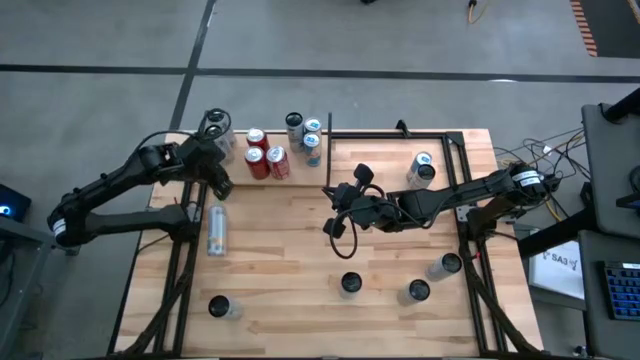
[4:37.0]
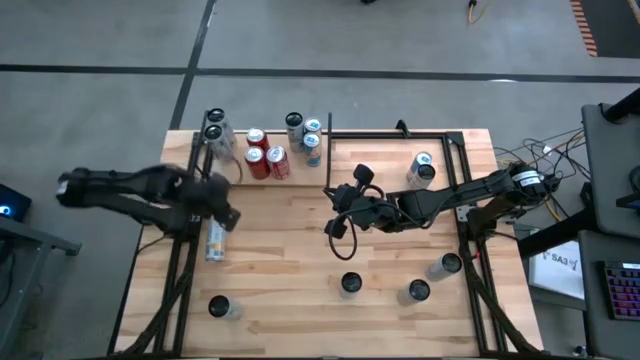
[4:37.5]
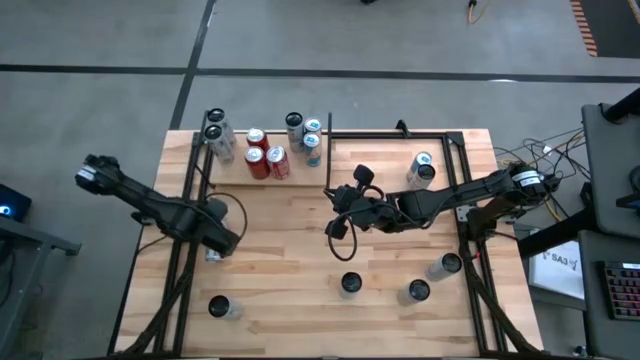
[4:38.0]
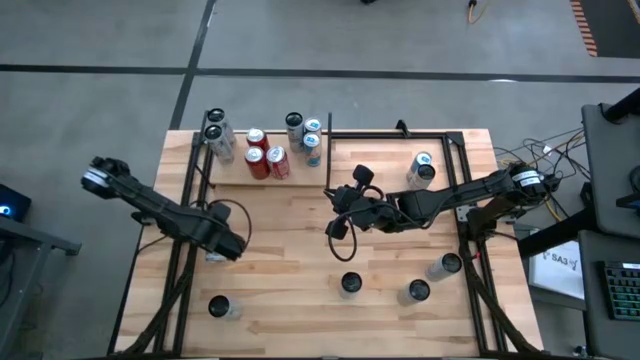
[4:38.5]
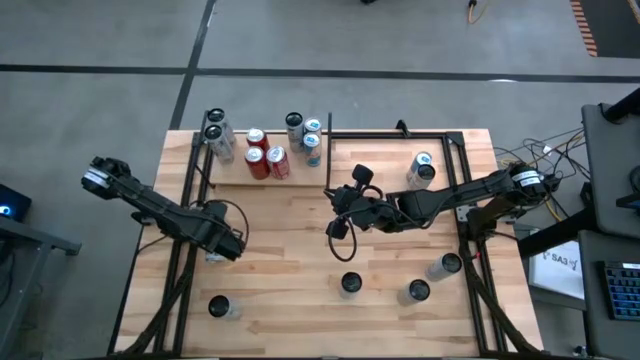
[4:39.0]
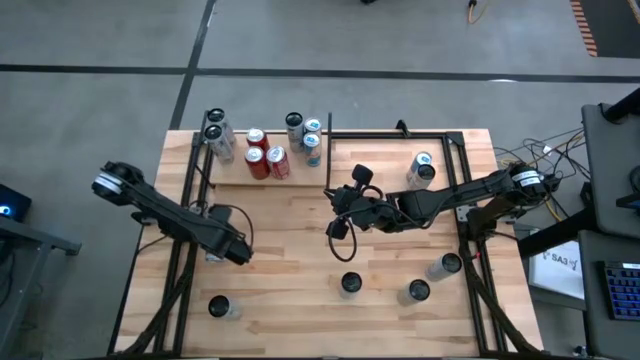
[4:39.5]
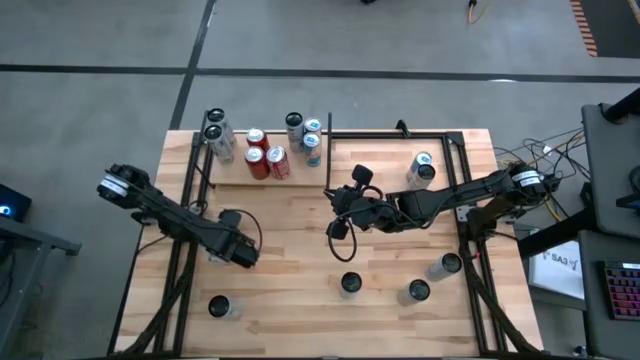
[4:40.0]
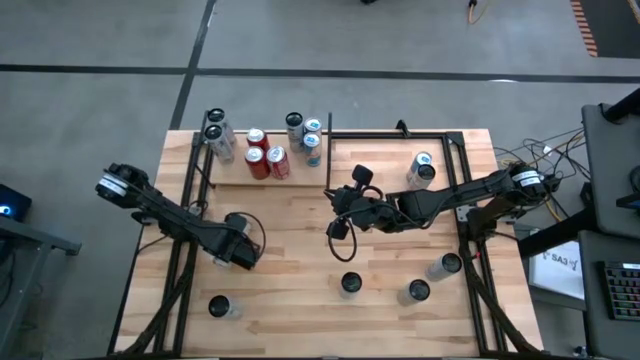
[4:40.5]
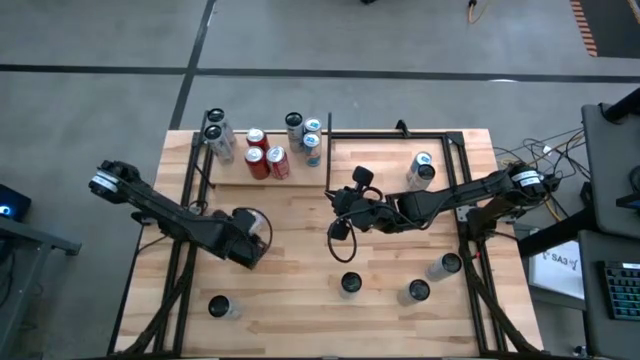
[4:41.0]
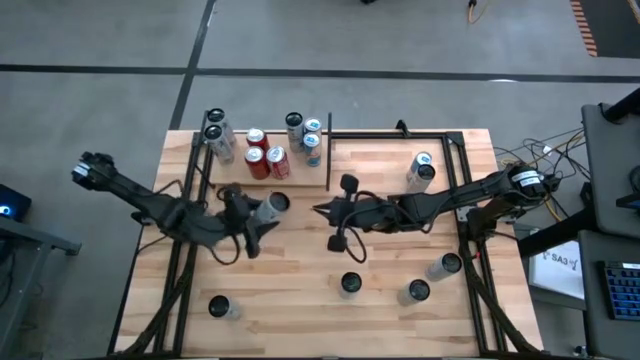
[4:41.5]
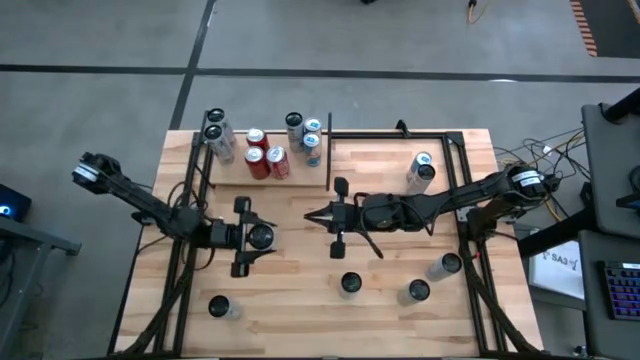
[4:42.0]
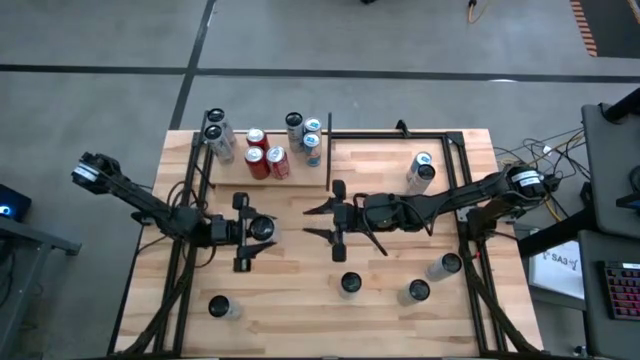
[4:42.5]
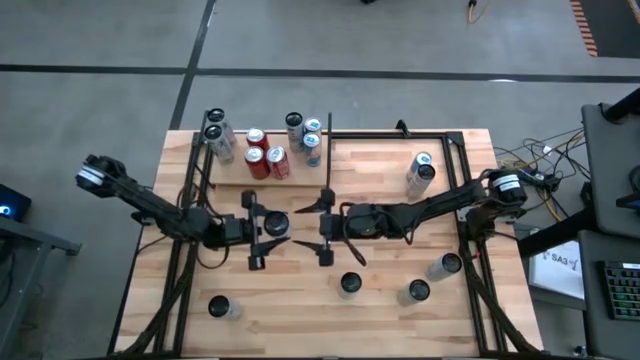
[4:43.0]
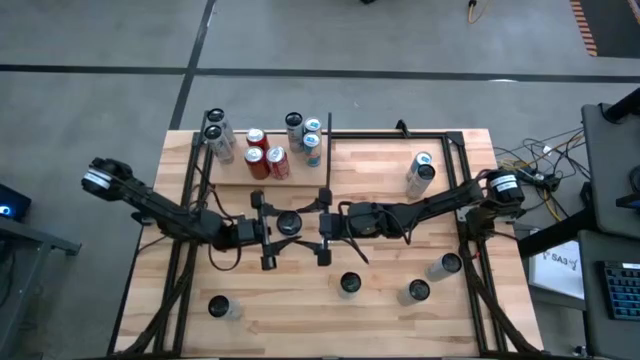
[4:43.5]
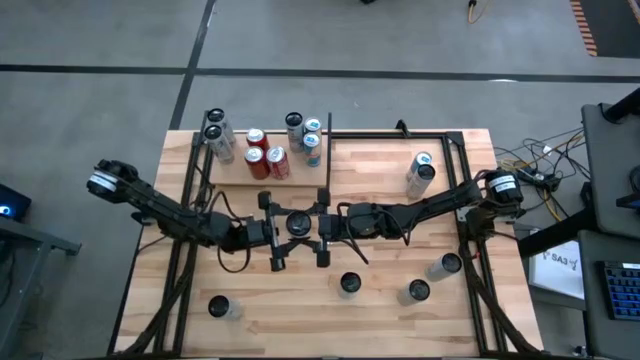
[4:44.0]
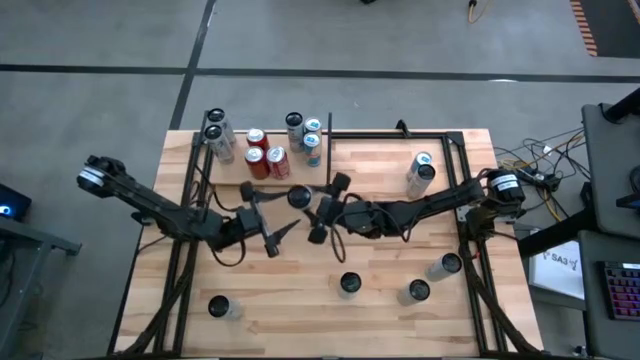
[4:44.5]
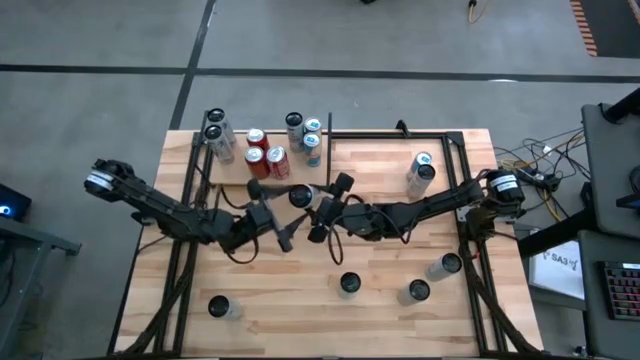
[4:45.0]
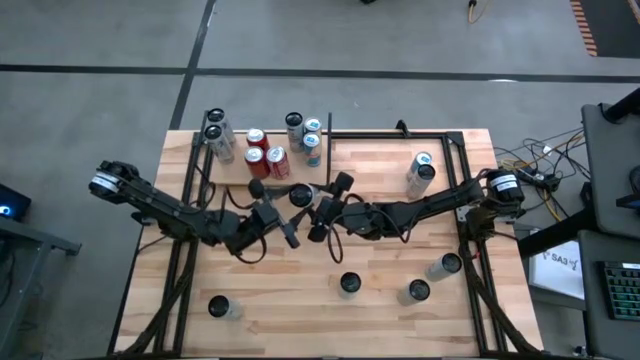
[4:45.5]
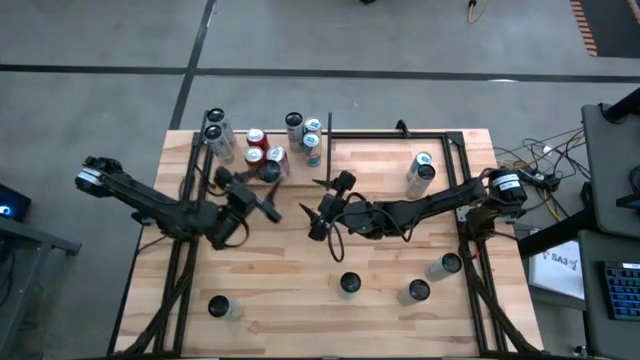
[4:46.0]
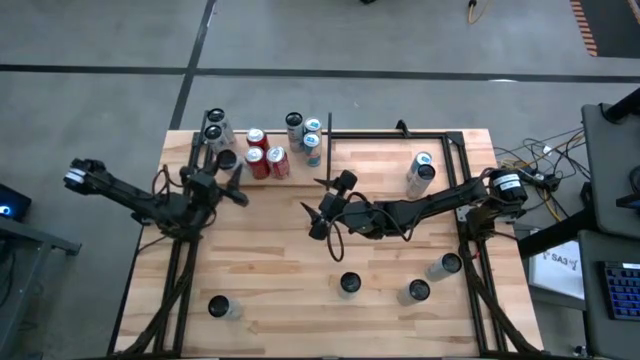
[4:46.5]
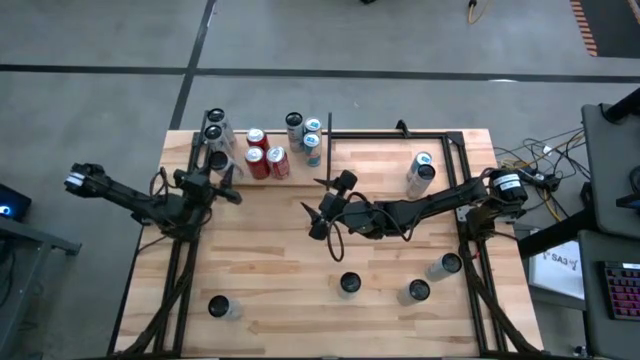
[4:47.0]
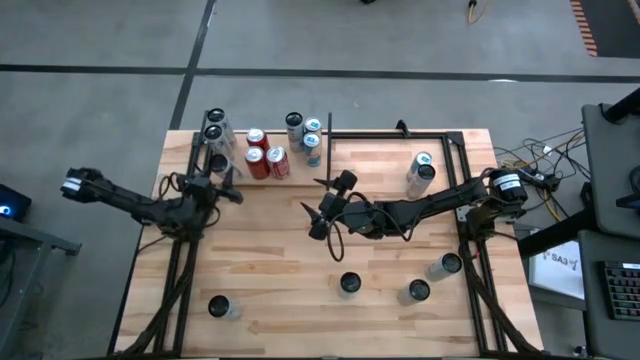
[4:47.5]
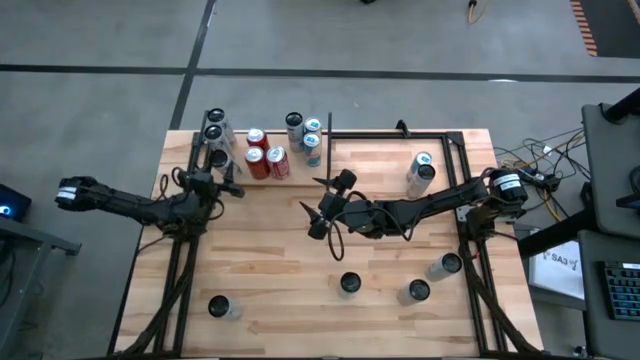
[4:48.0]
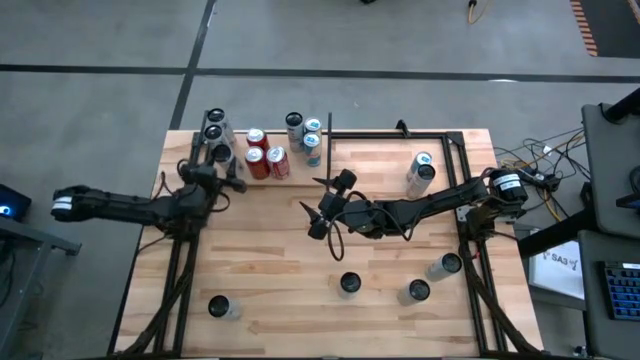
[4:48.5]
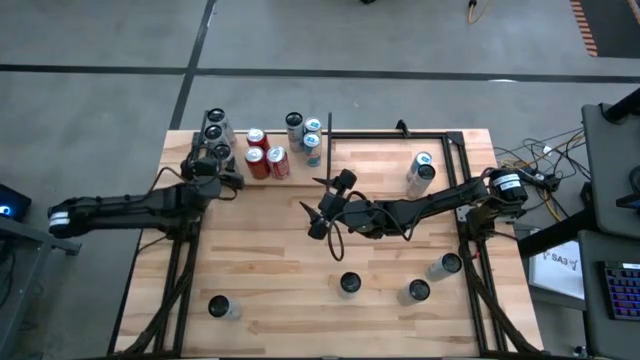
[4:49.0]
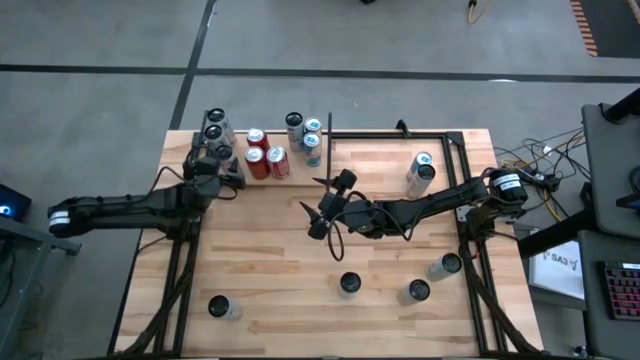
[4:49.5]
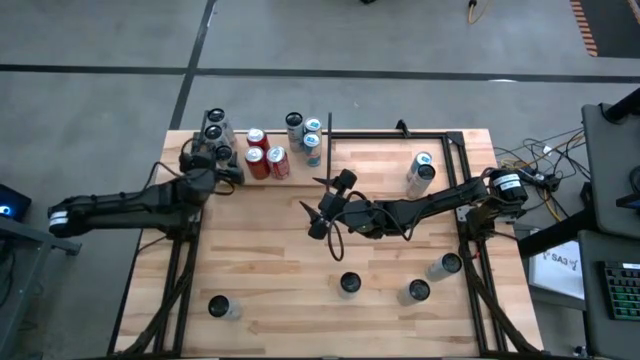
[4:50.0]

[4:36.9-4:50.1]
Task: Place canned beverage on shelf
Put the middle left white and yellow soda can on the shelf

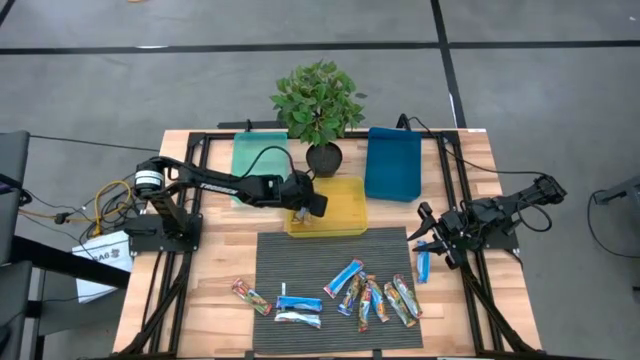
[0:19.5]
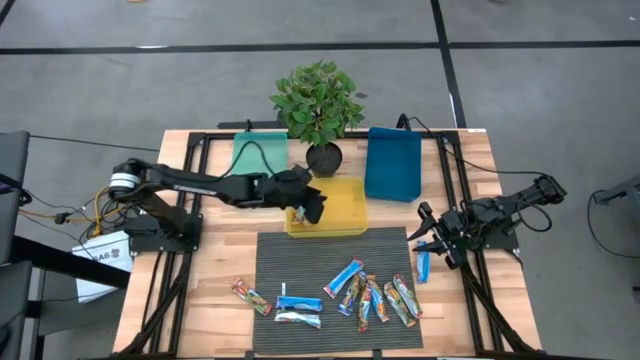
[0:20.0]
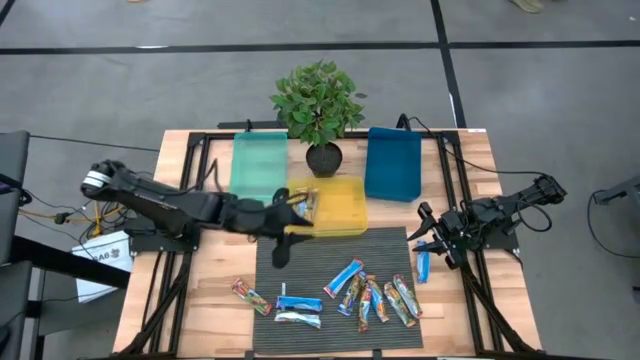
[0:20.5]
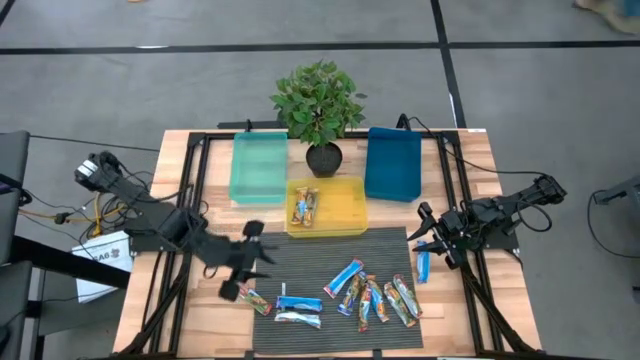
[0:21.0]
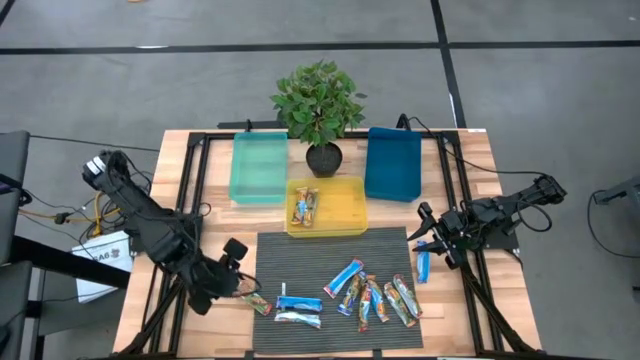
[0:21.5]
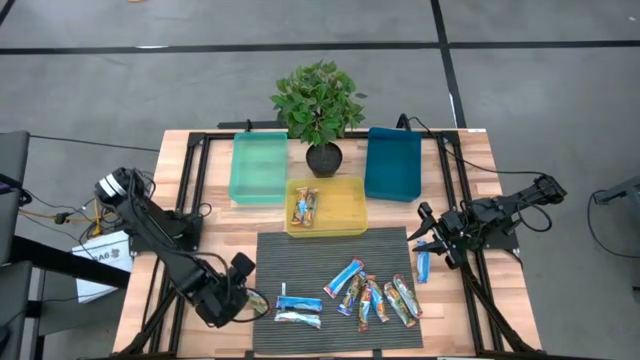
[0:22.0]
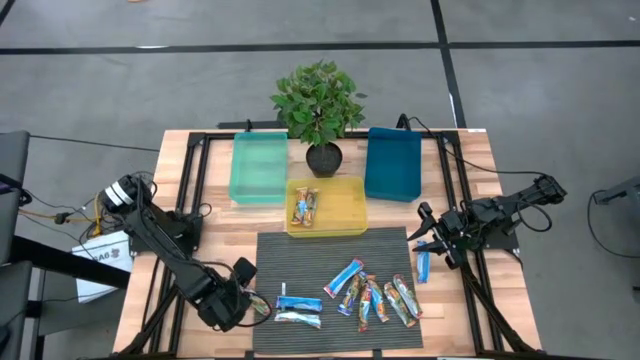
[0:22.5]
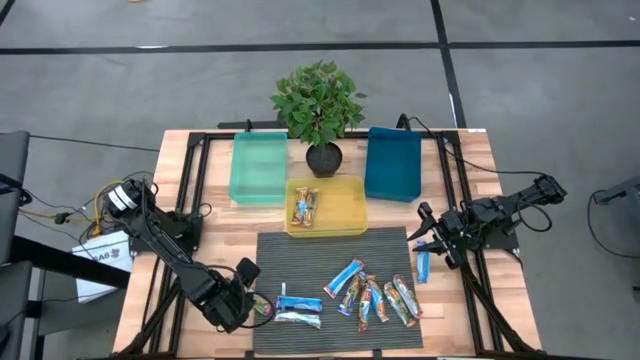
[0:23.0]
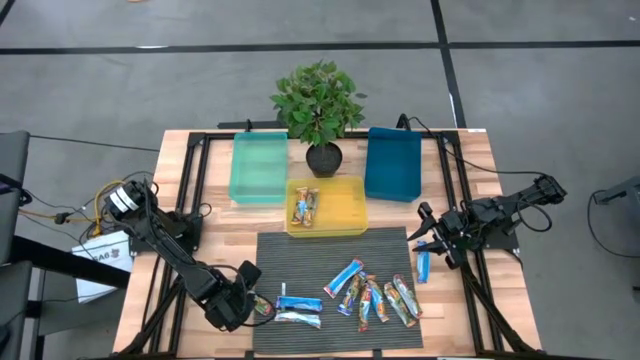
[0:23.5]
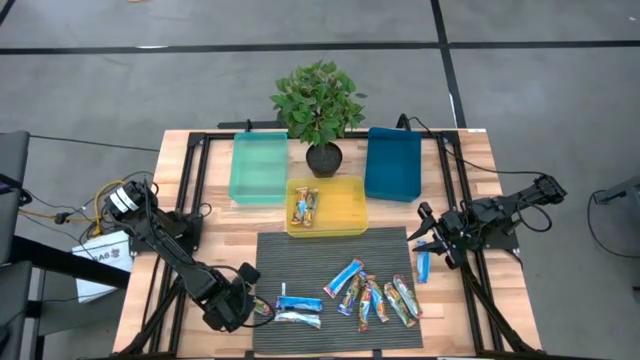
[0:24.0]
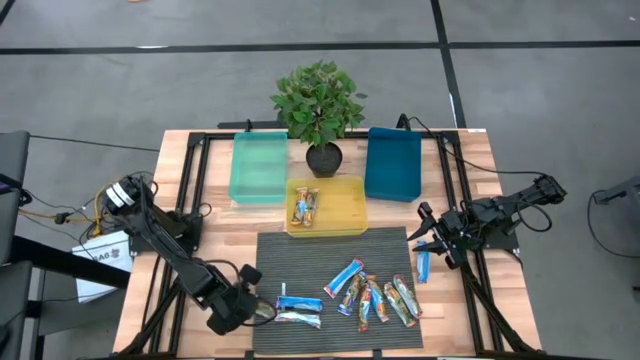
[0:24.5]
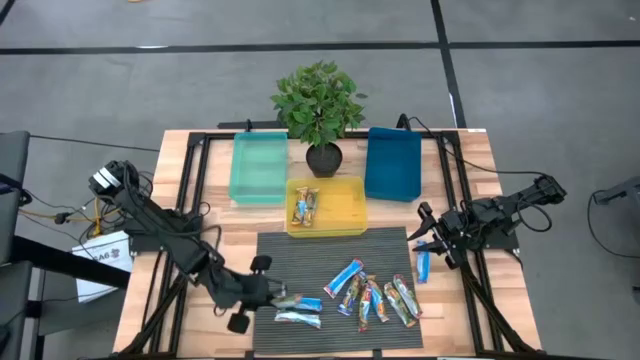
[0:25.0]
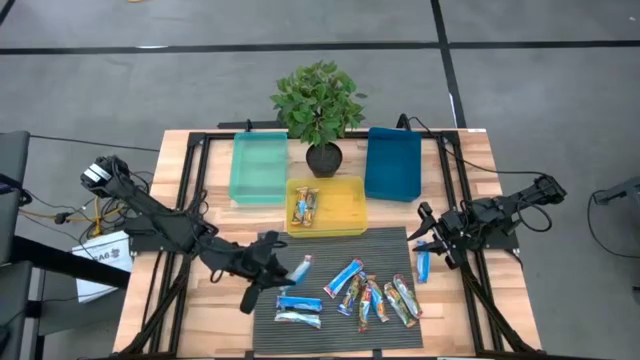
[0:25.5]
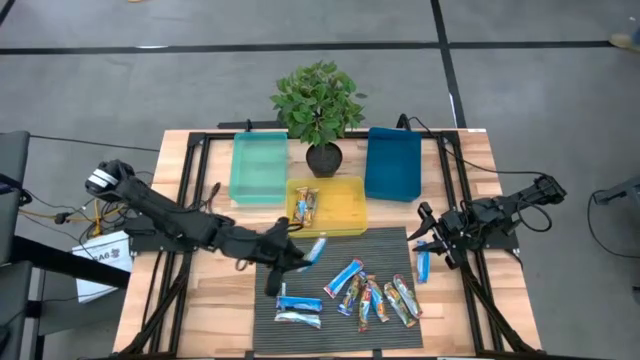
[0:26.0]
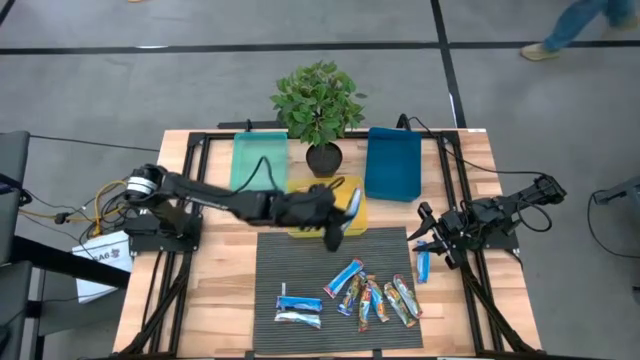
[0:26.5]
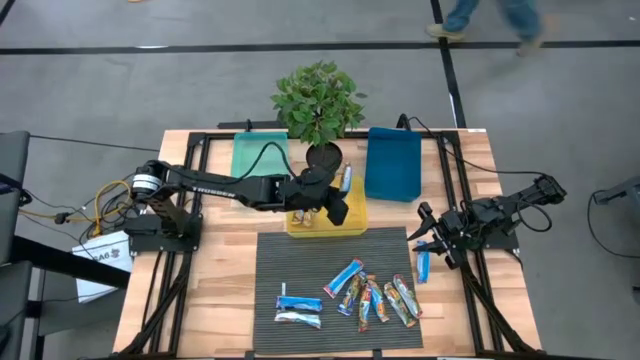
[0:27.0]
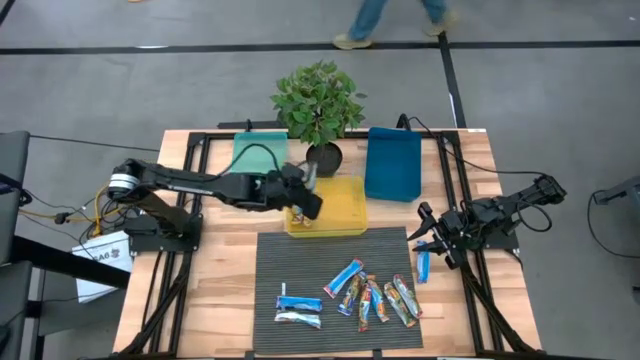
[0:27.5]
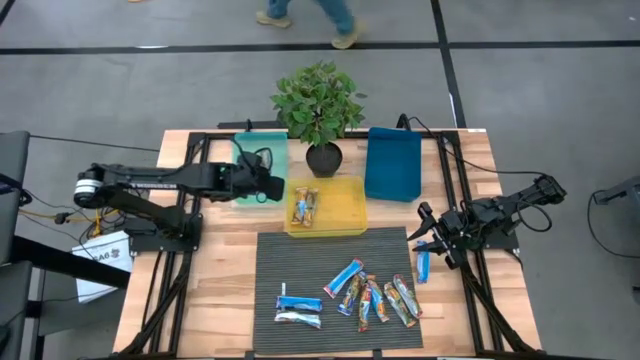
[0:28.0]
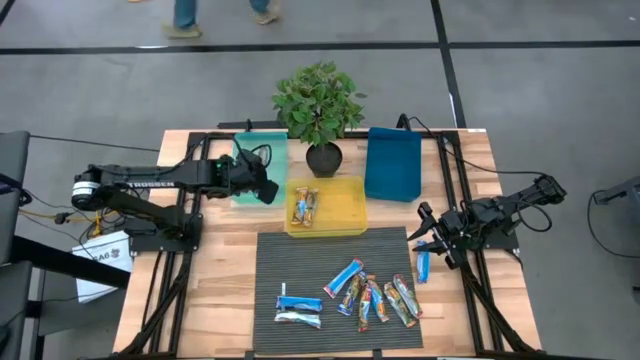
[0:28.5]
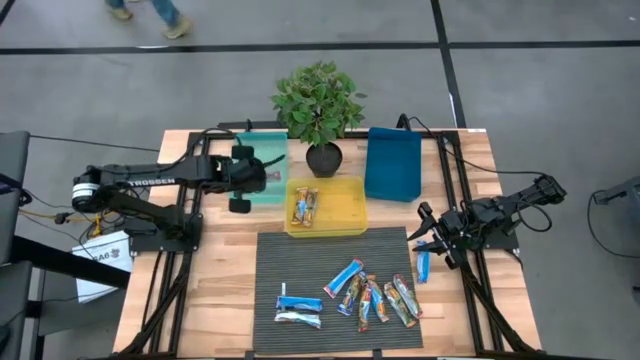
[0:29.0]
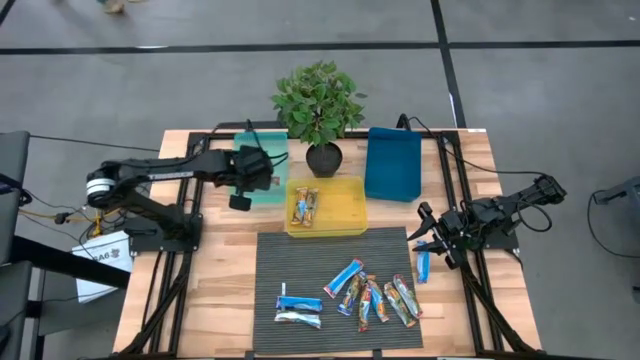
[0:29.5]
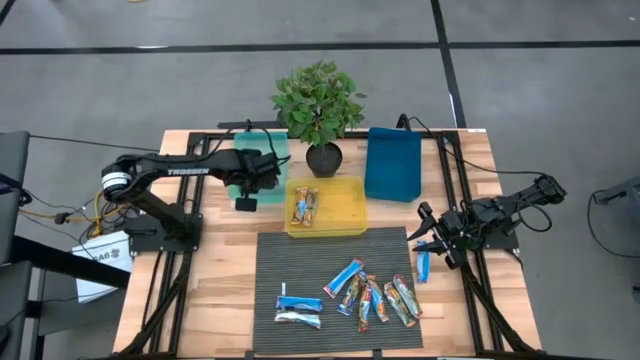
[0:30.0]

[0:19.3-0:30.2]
Task: Pick and place Granola Bars by type
Put the red granola bar into the green bin
